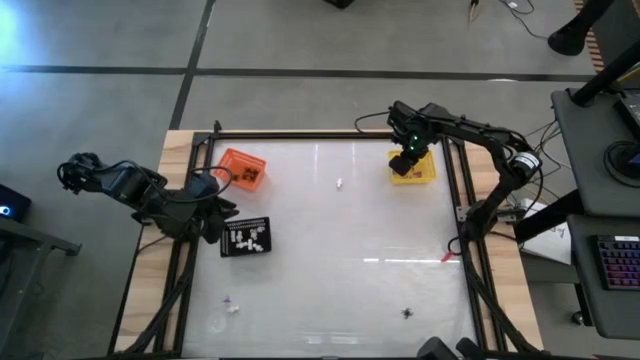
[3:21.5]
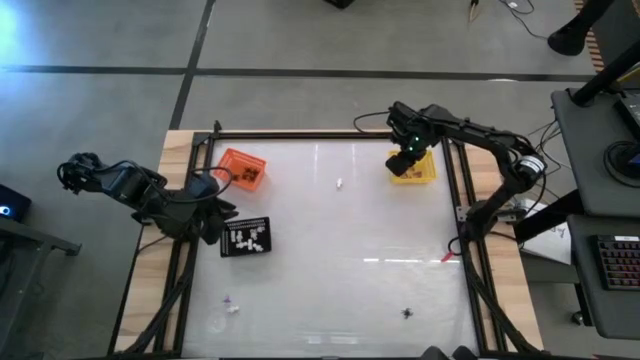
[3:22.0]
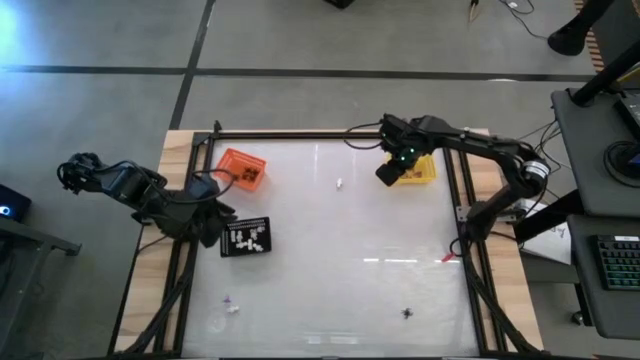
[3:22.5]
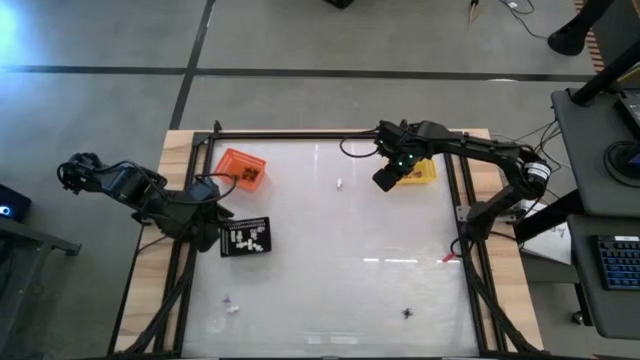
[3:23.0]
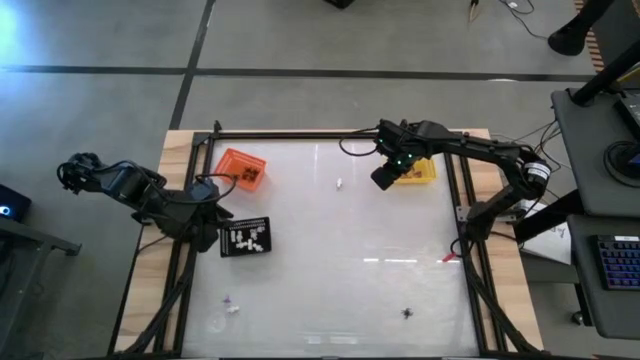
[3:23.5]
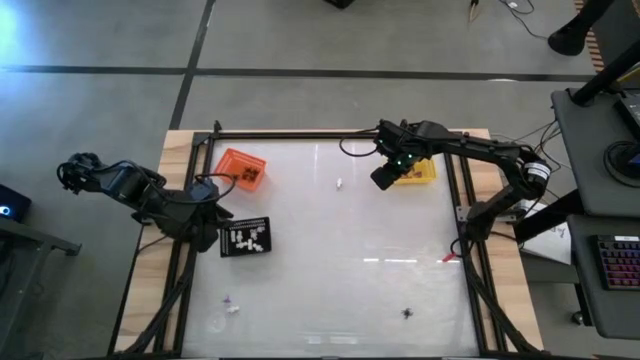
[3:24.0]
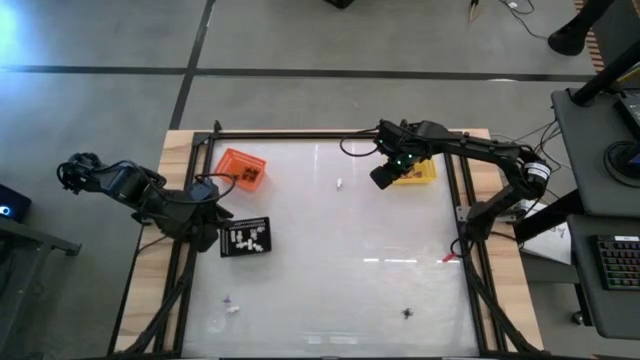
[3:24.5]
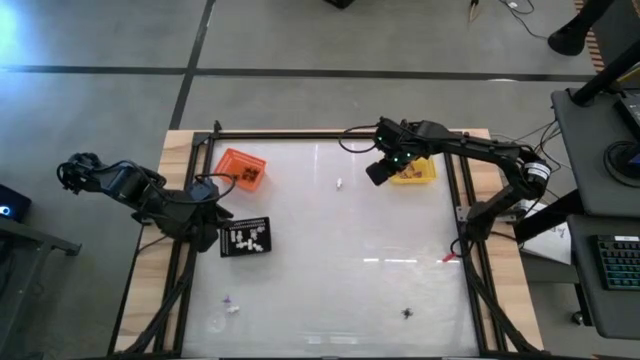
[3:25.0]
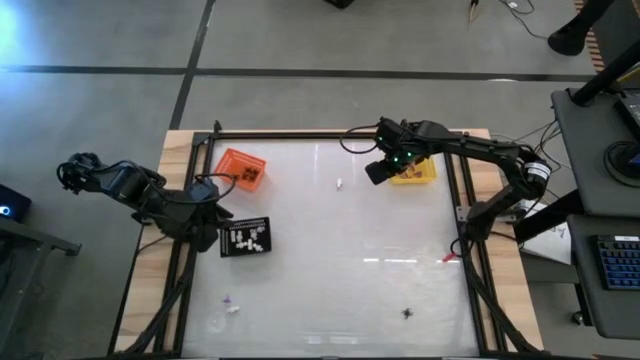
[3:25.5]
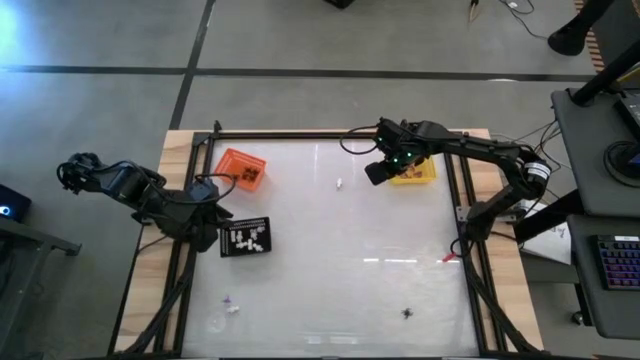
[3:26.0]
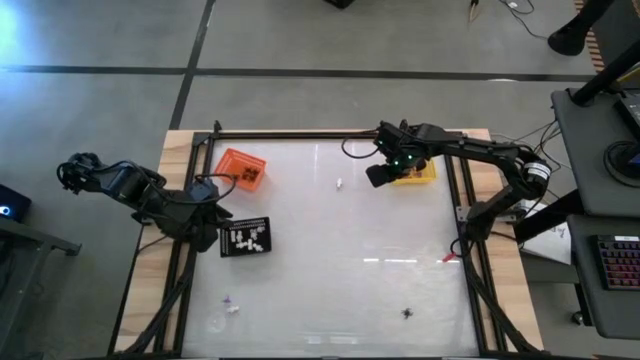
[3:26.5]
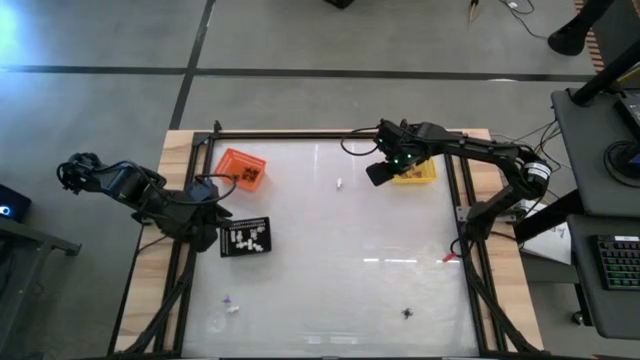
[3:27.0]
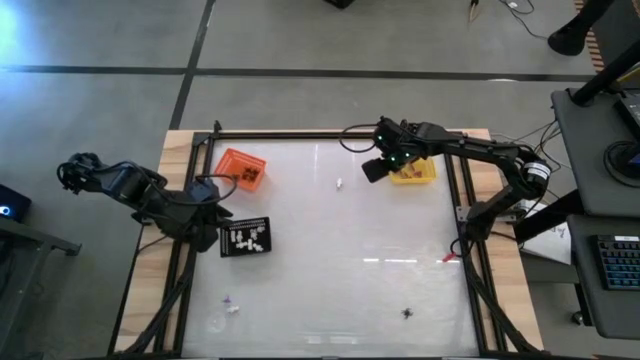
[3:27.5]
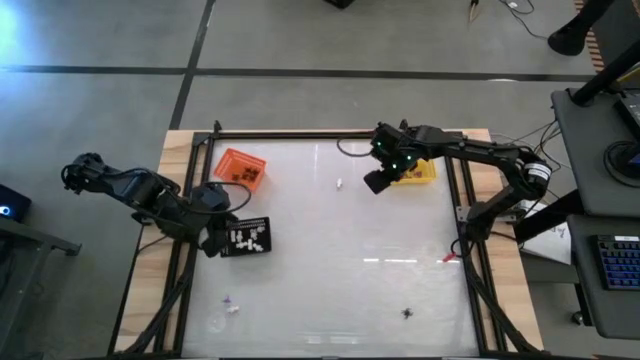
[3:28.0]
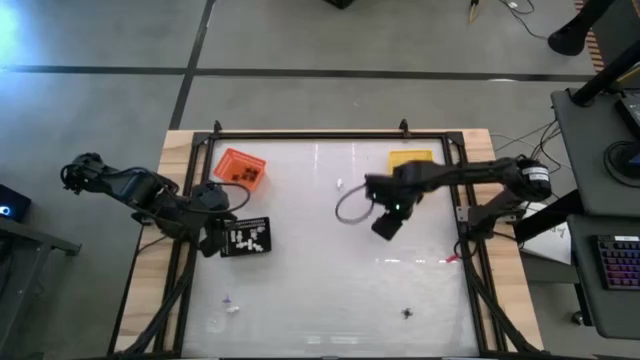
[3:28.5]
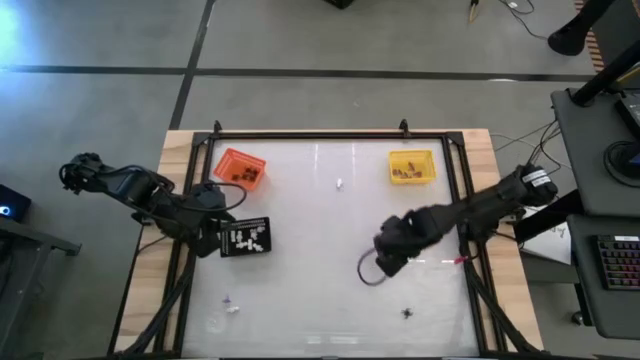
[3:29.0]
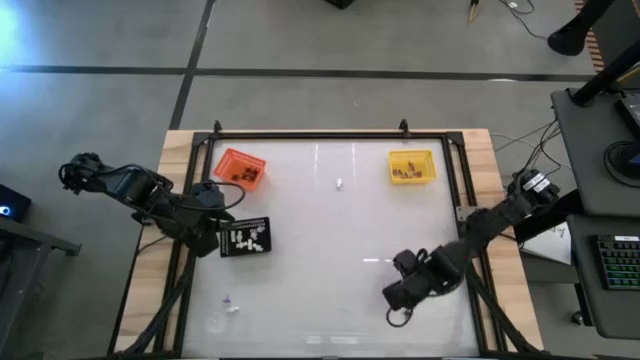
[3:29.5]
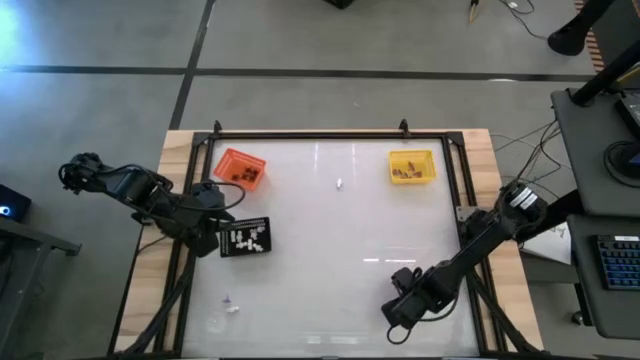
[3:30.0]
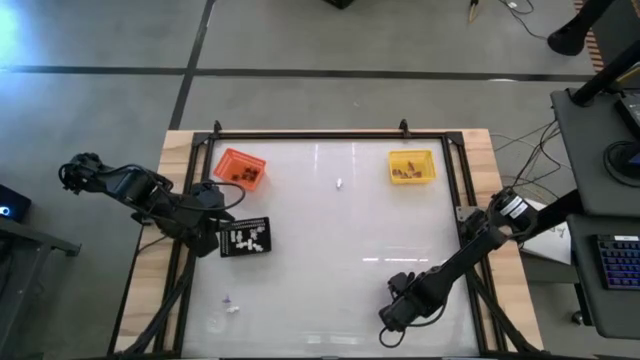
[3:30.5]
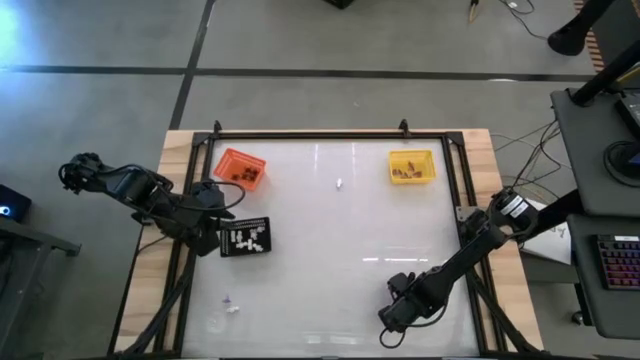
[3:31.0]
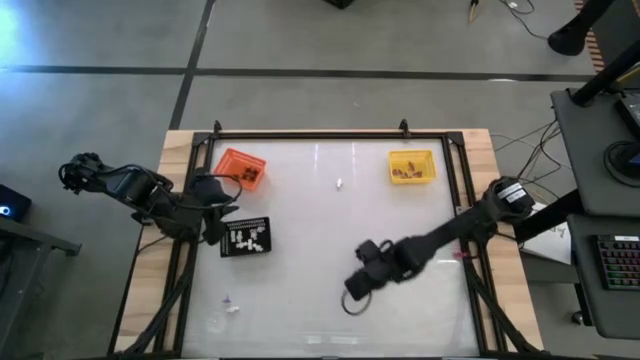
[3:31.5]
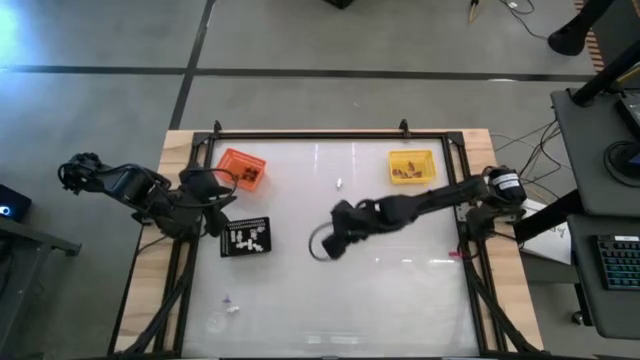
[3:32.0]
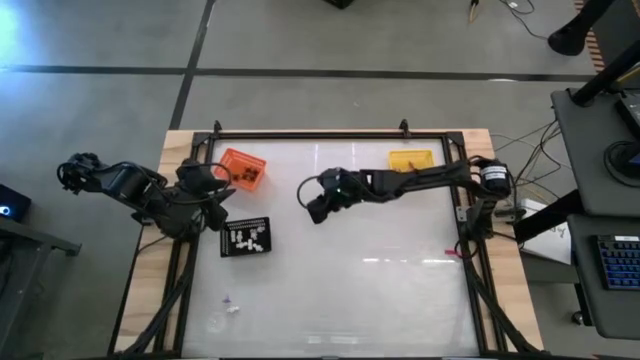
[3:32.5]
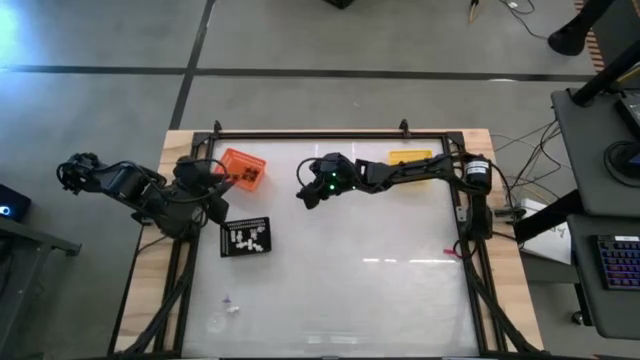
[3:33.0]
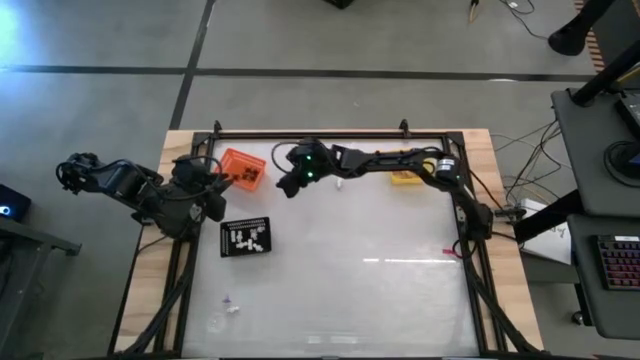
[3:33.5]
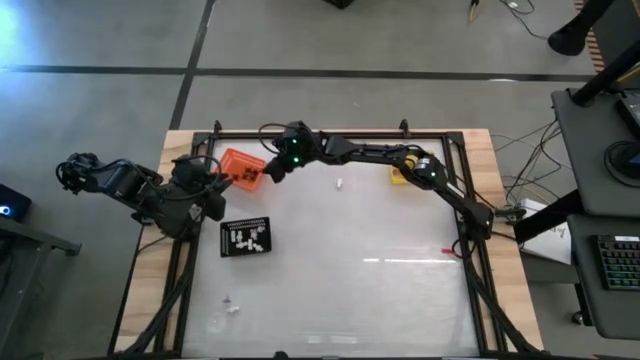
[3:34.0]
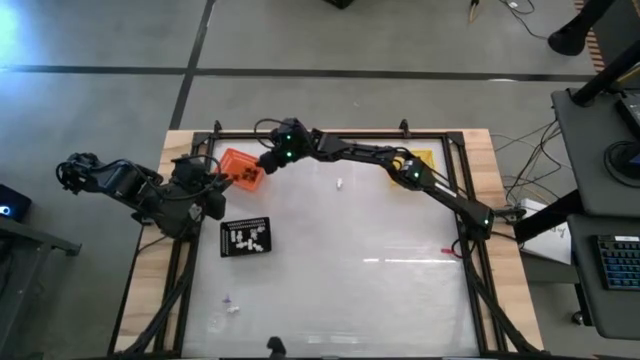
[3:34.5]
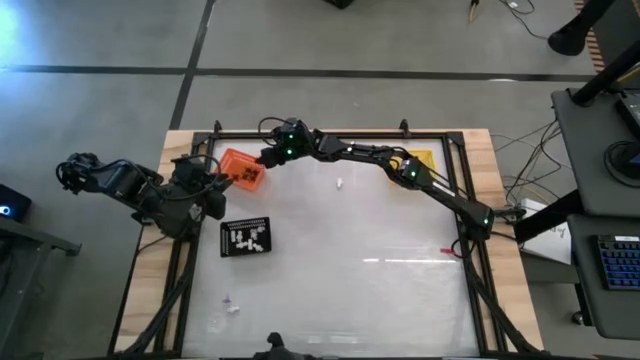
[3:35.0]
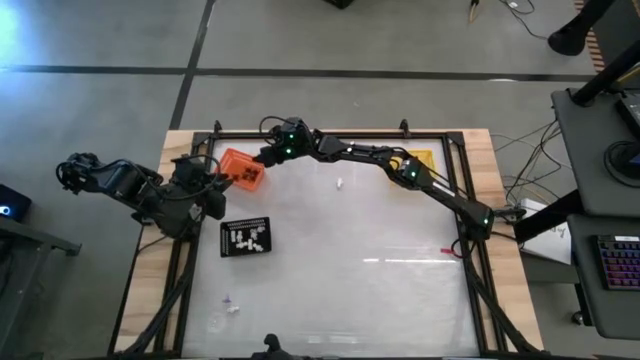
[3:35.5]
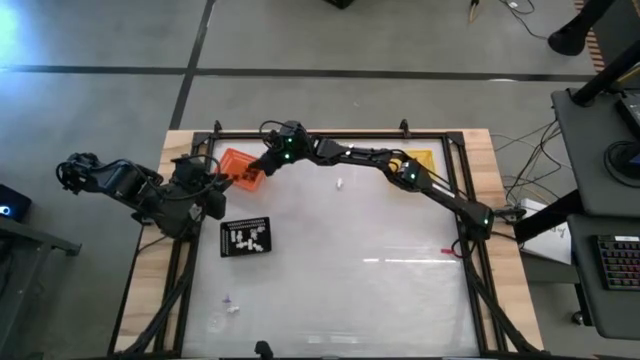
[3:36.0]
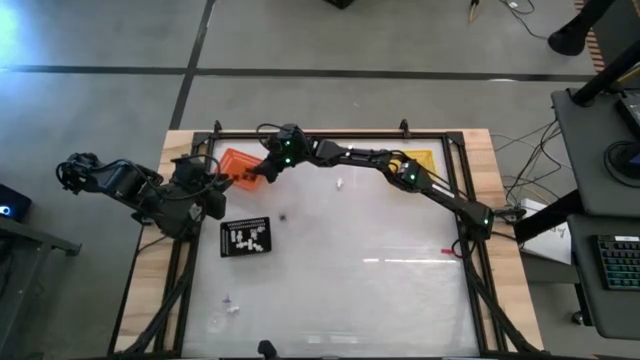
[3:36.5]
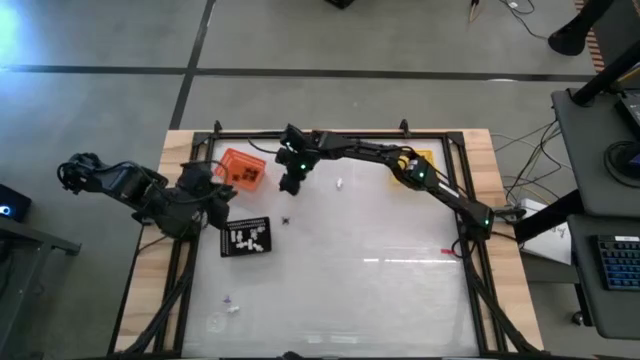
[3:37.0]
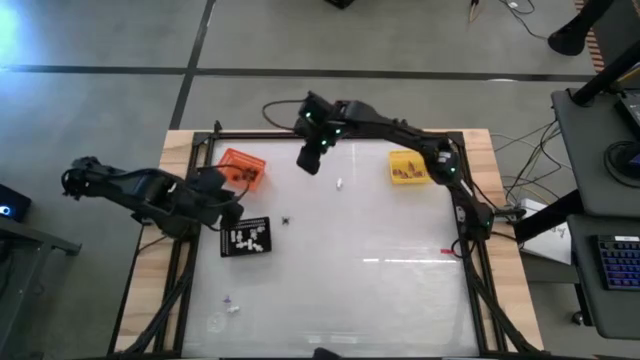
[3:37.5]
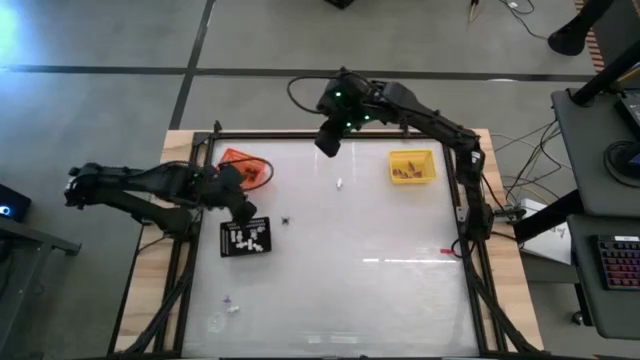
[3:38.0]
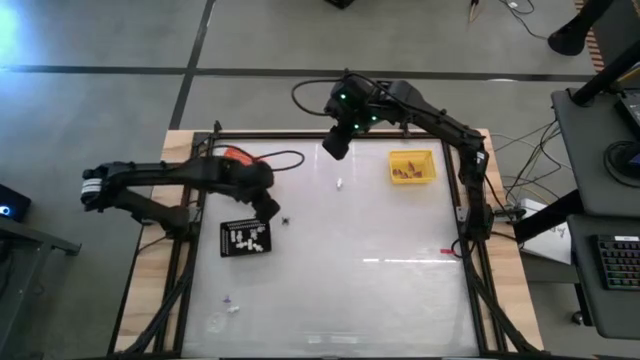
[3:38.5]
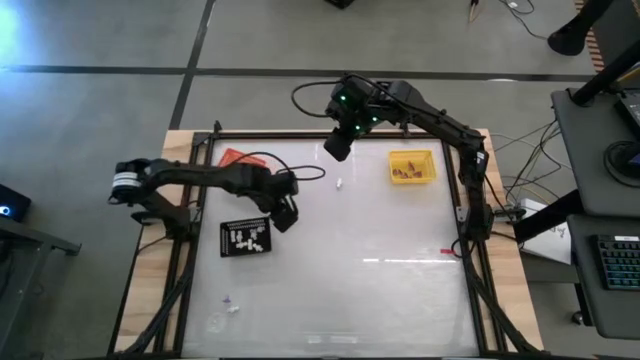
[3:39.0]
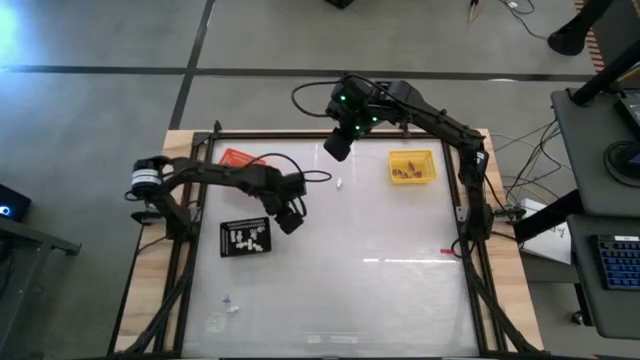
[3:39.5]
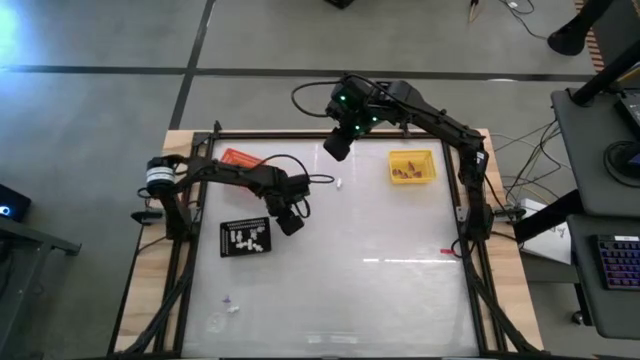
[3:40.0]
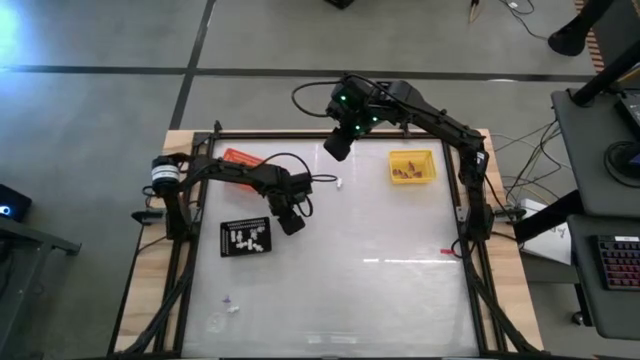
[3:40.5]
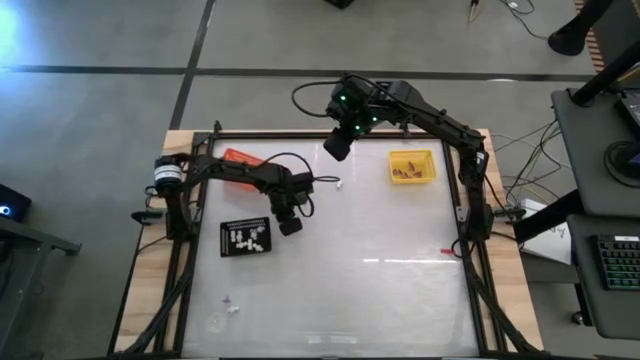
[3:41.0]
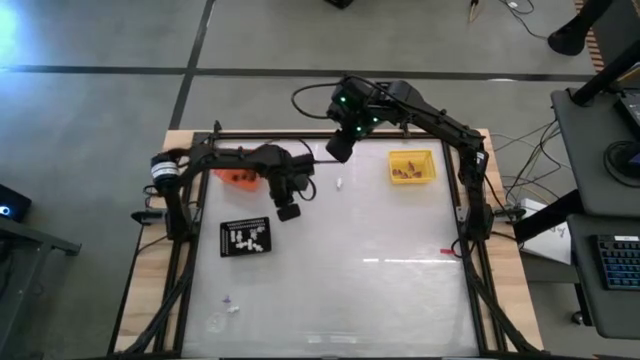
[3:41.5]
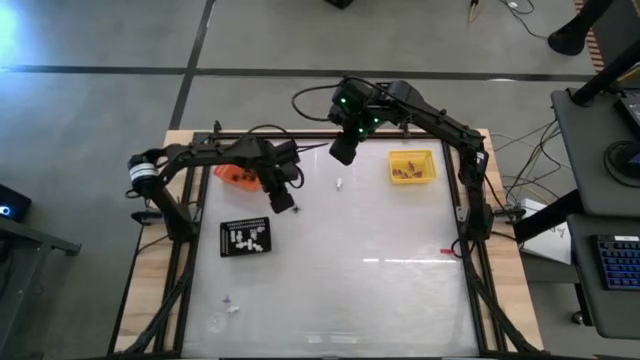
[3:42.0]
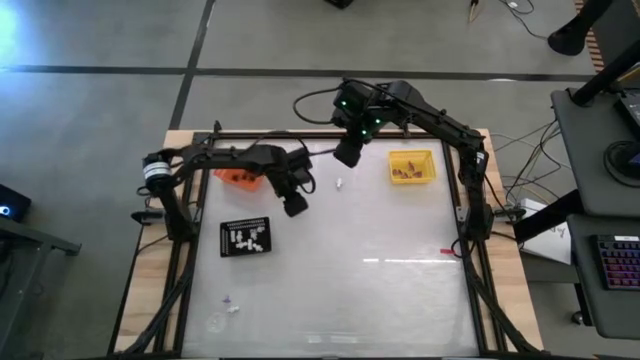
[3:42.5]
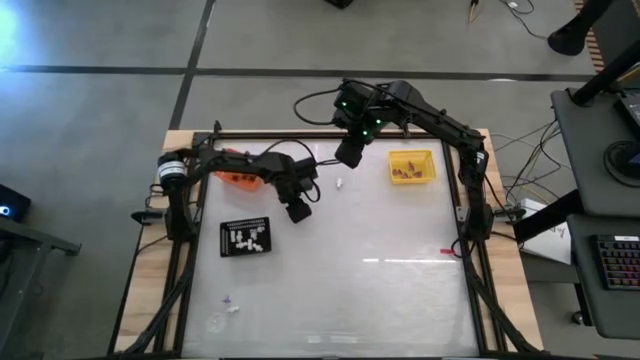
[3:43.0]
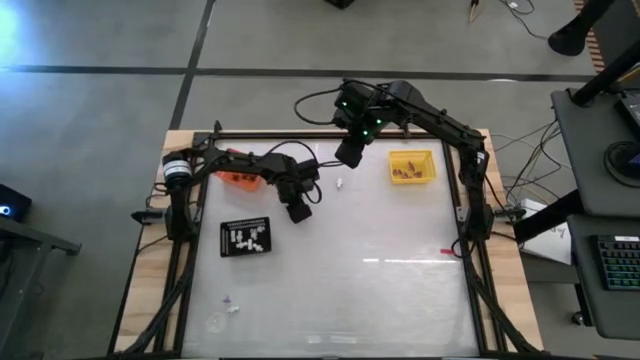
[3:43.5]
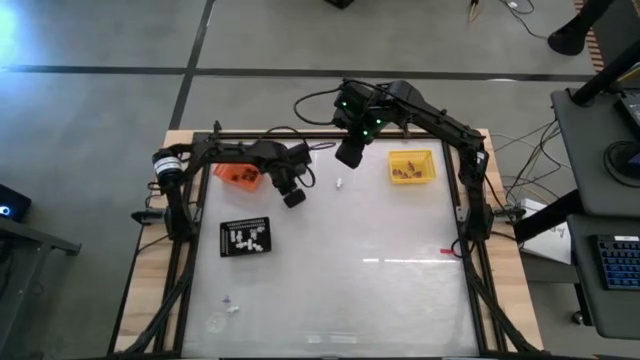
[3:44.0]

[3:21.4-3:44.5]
Task: Sort Halloween decoration
Put the black spider toy into the orange bin
